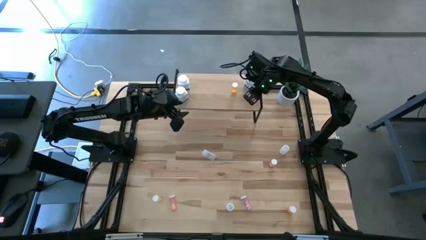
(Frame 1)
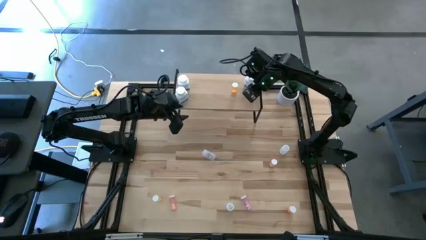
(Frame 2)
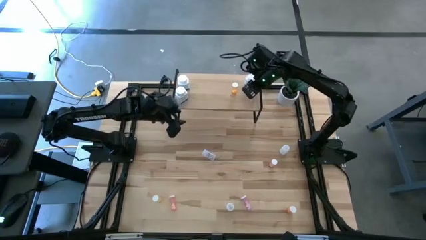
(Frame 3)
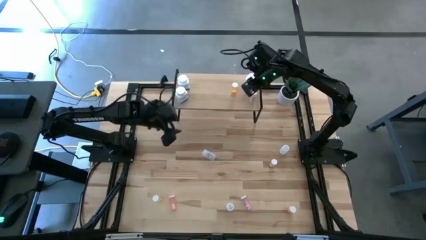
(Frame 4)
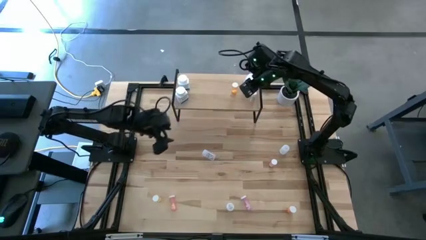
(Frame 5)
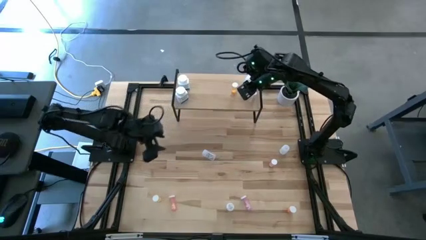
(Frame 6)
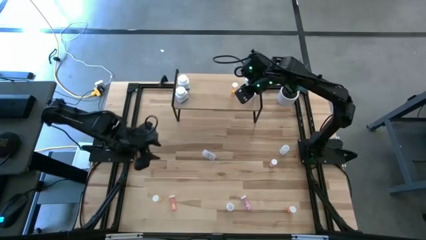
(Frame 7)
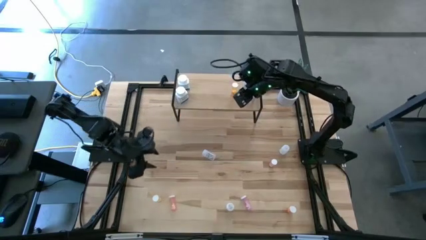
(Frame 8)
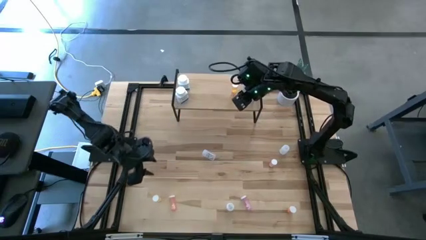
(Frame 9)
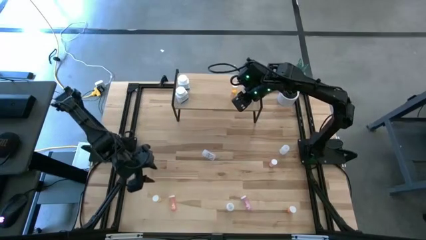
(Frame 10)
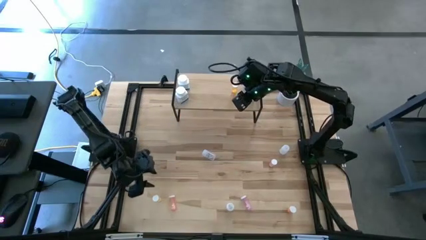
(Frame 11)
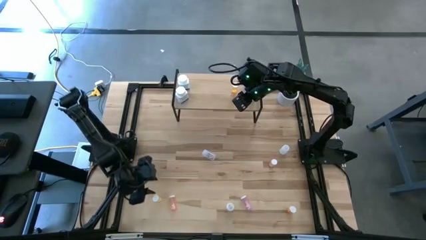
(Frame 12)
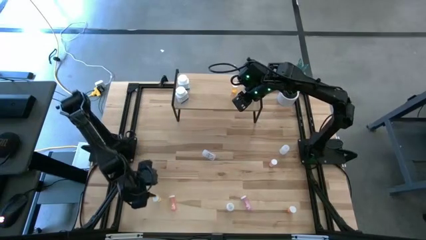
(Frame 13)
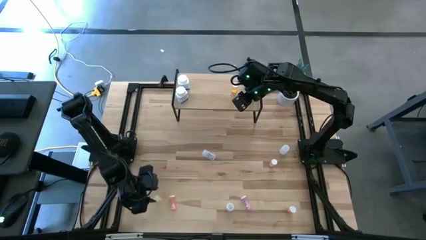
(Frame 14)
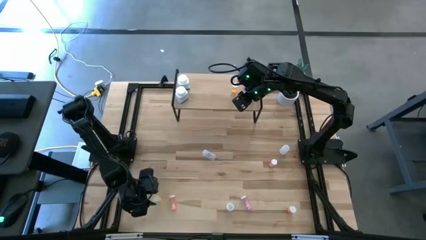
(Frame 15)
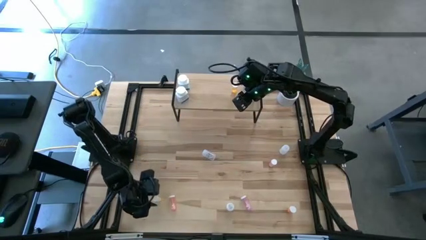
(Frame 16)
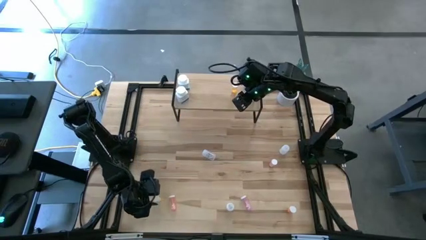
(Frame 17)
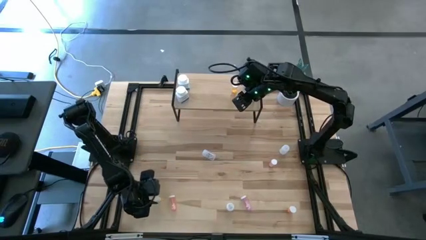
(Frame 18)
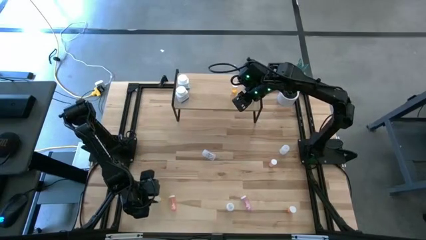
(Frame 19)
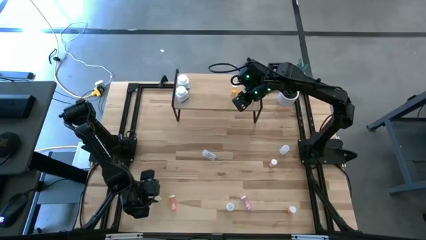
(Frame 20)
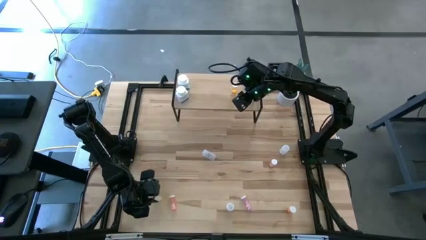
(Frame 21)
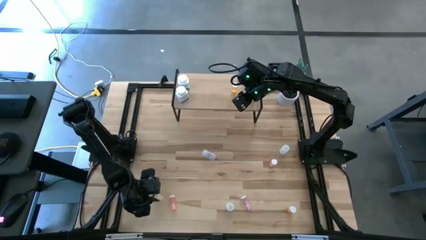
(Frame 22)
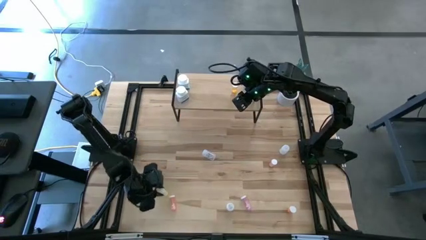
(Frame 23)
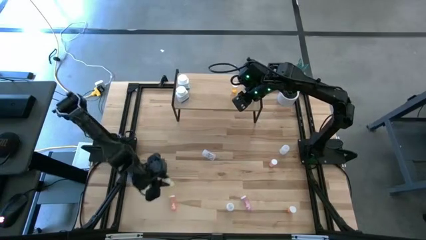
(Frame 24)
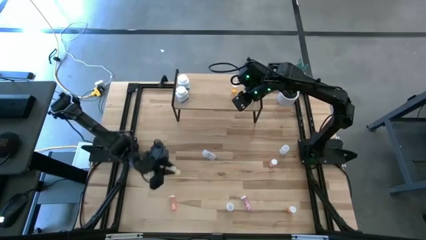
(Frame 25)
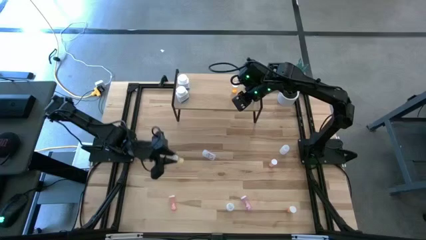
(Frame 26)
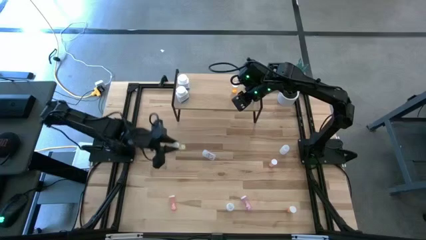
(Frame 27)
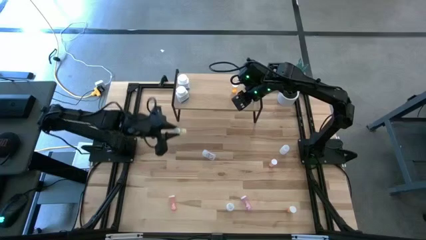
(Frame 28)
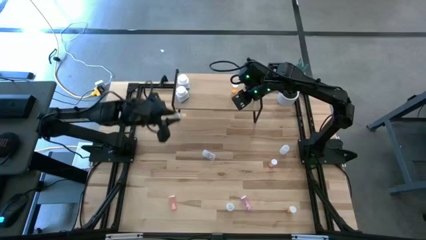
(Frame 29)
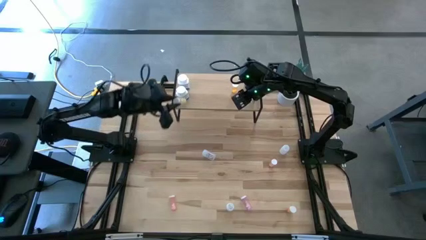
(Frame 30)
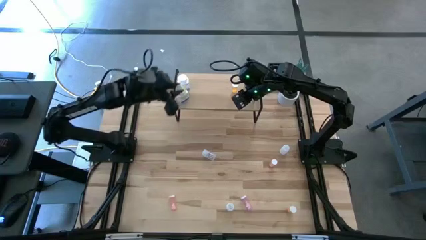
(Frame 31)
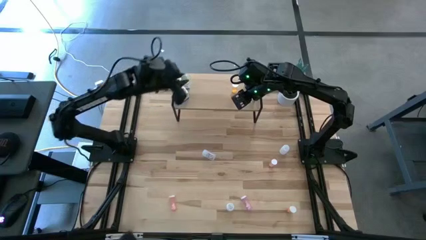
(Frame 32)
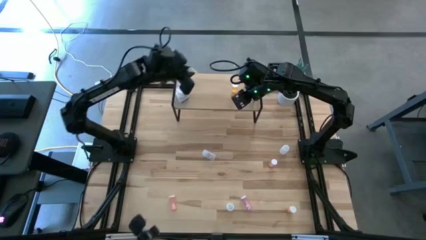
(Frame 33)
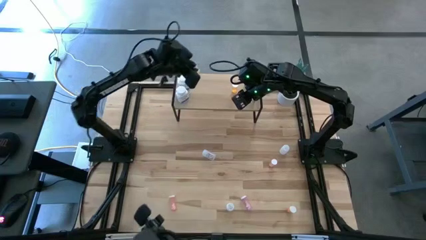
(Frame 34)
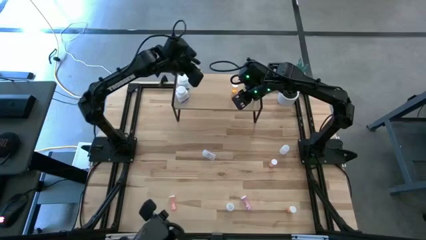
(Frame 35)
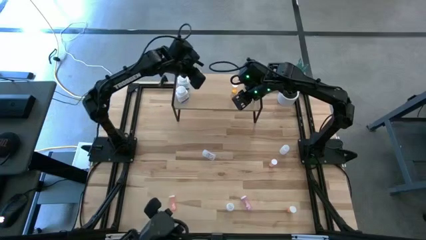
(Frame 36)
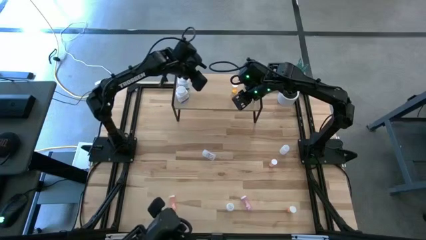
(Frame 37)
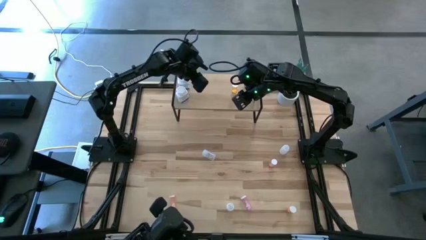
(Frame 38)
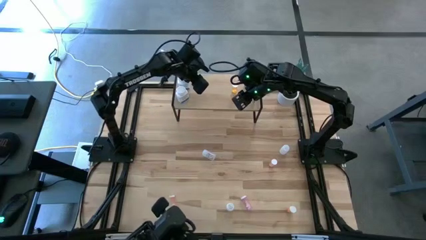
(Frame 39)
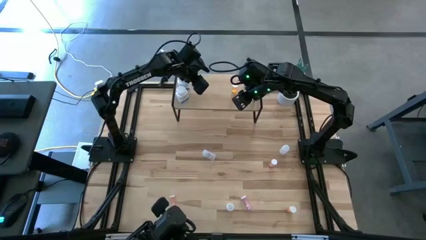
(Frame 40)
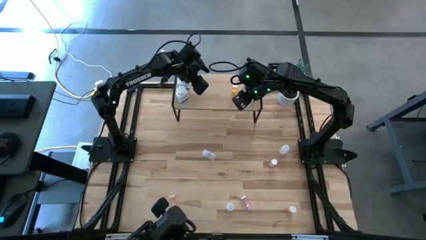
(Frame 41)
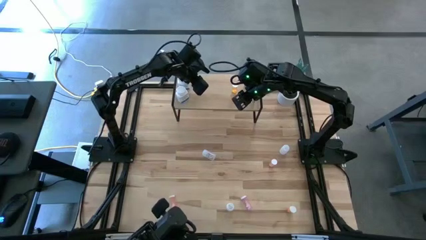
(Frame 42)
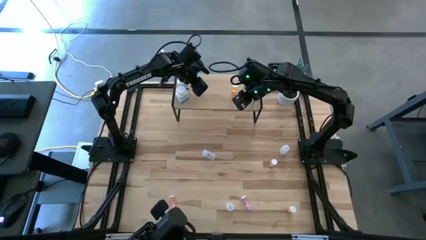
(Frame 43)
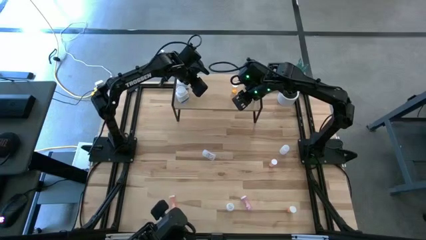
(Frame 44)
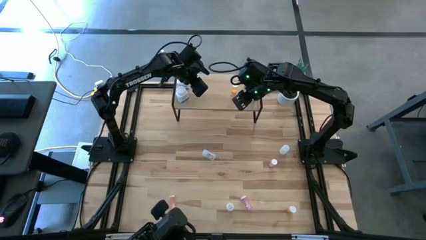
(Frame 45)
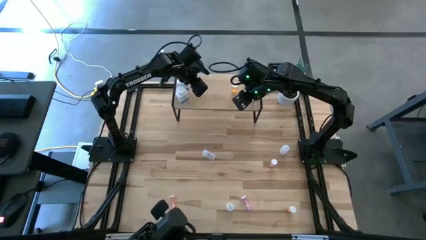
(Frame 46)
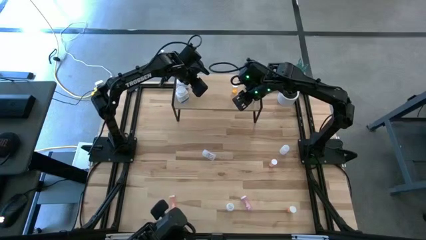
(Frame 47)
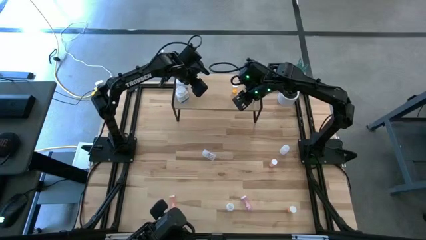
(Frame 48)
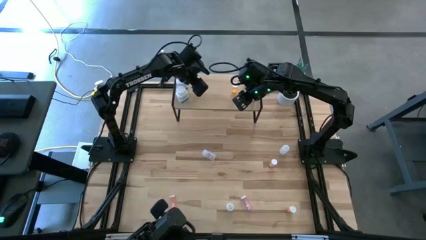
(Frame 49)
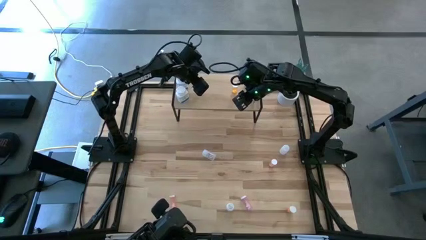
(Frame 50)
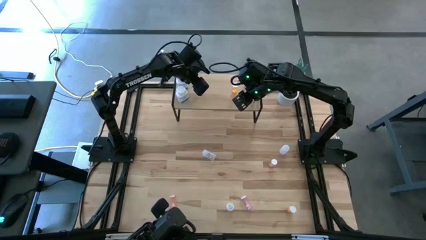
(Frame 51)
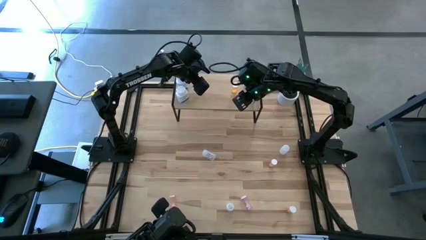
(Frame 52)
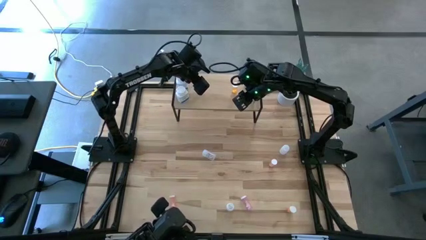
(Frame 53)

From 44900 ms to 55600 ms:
Task: Pick and place medicine bottles onto shelf by color
Put the yellow pill bottle on the shelf

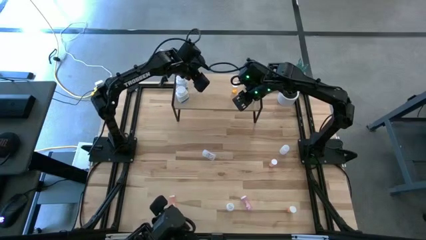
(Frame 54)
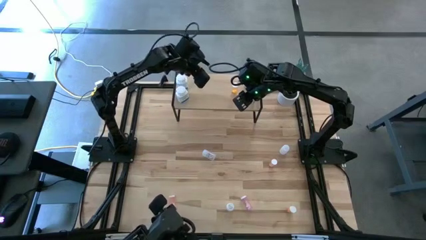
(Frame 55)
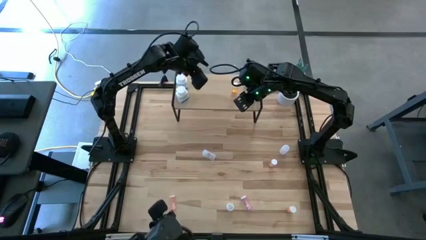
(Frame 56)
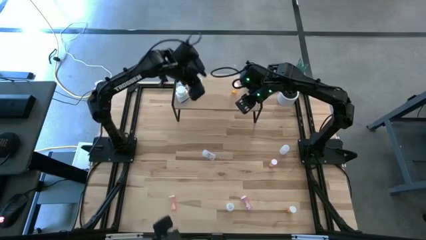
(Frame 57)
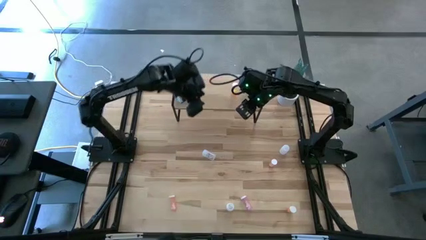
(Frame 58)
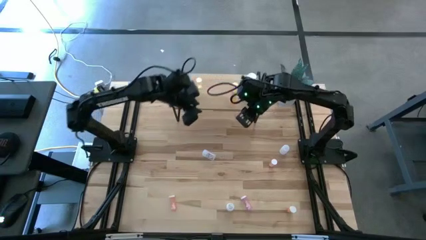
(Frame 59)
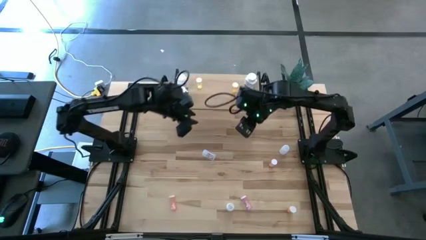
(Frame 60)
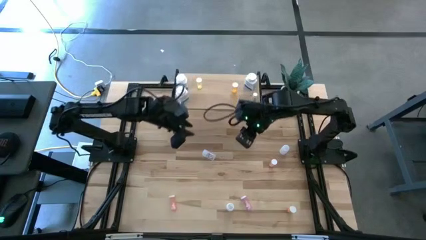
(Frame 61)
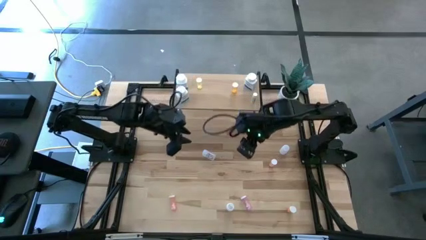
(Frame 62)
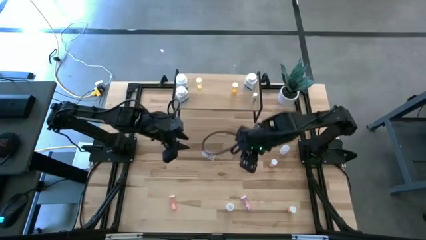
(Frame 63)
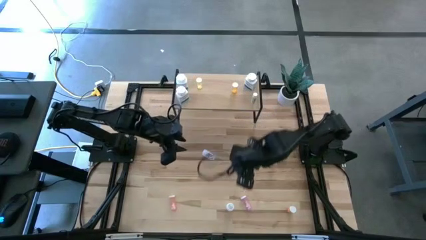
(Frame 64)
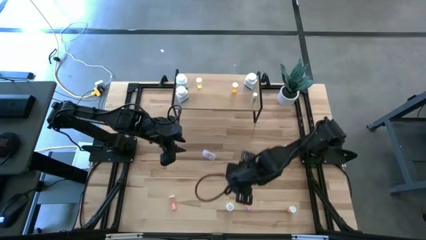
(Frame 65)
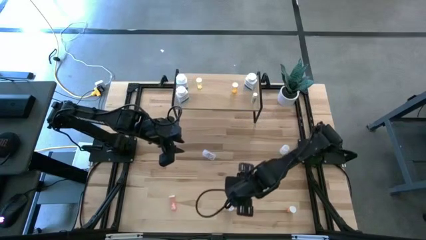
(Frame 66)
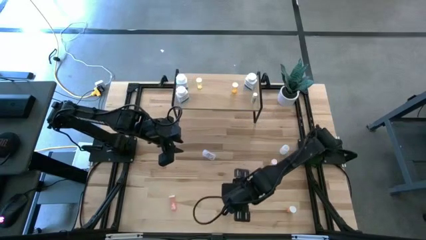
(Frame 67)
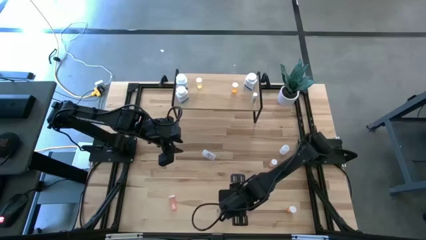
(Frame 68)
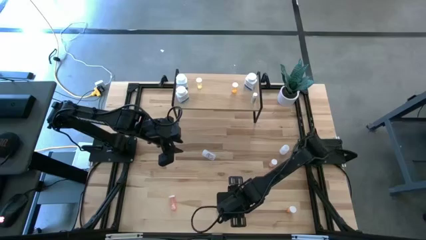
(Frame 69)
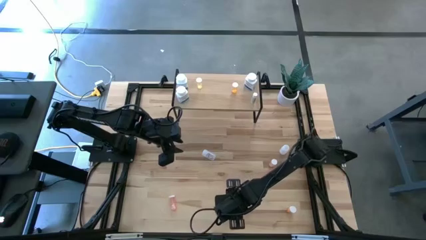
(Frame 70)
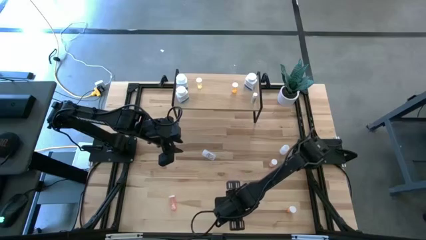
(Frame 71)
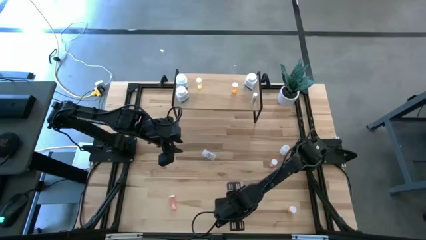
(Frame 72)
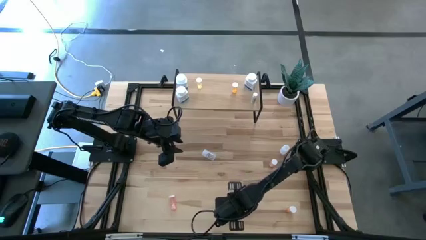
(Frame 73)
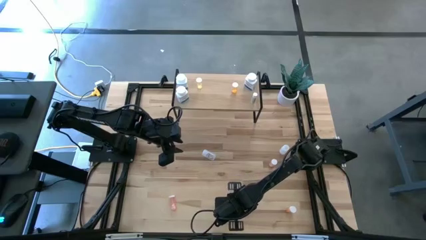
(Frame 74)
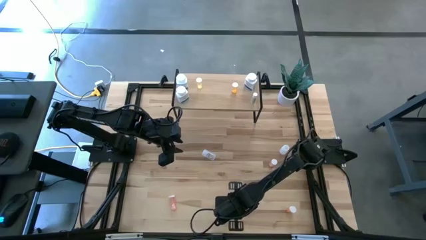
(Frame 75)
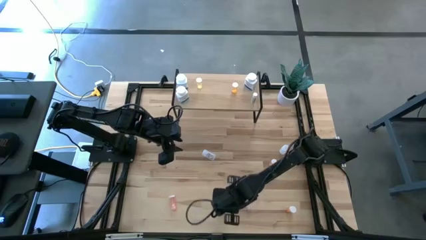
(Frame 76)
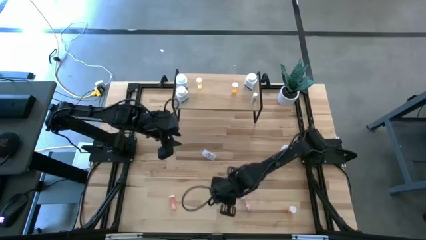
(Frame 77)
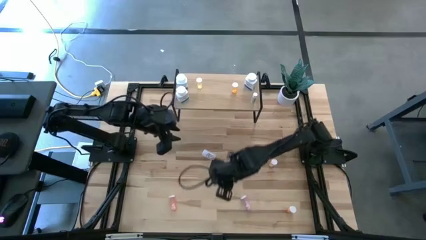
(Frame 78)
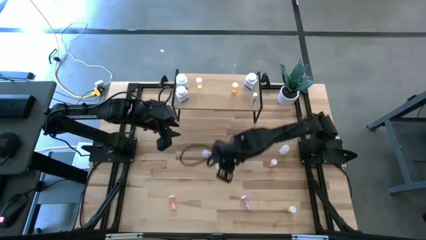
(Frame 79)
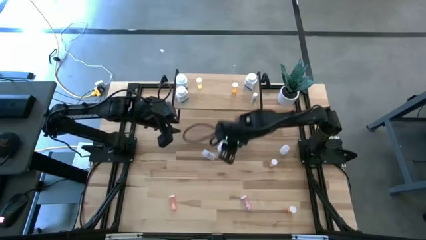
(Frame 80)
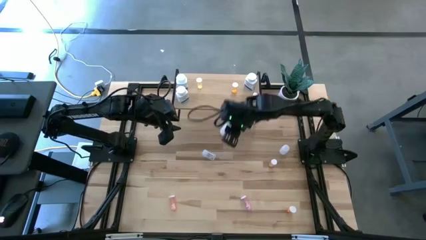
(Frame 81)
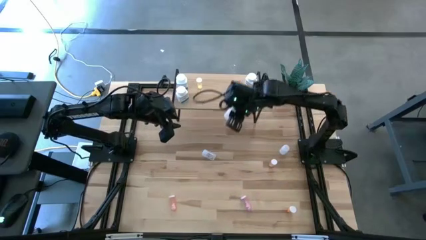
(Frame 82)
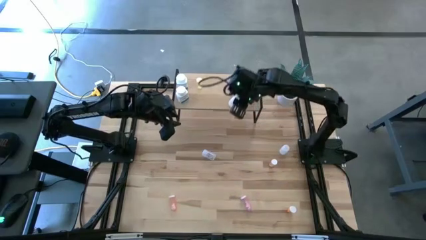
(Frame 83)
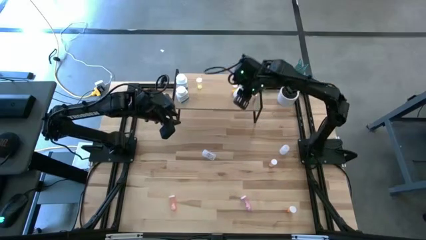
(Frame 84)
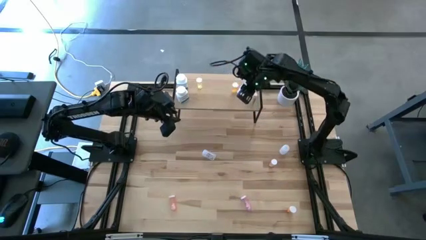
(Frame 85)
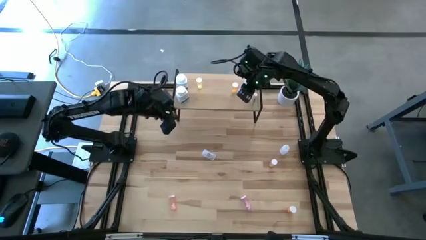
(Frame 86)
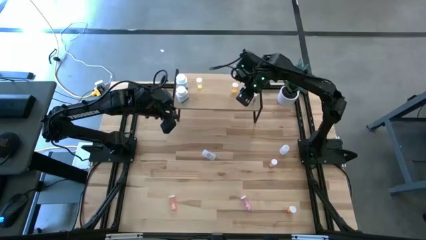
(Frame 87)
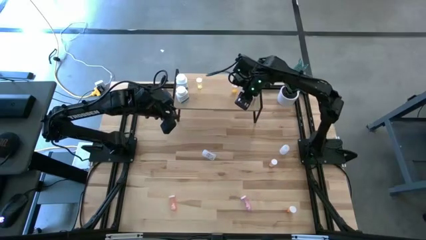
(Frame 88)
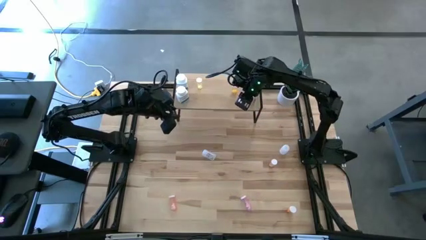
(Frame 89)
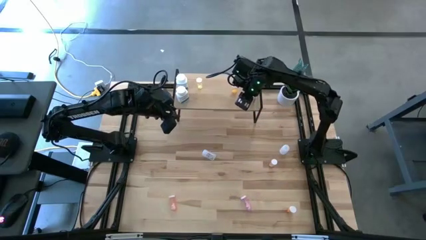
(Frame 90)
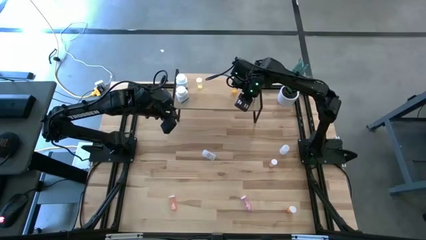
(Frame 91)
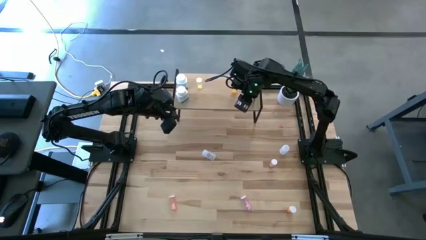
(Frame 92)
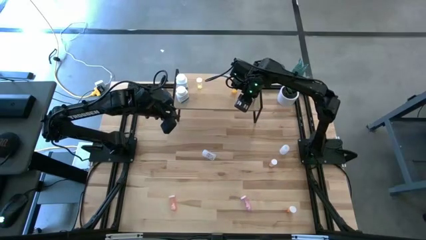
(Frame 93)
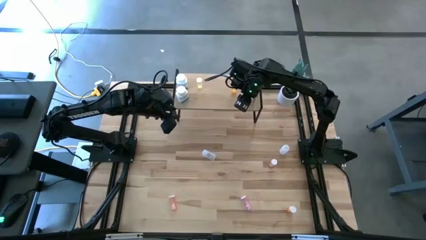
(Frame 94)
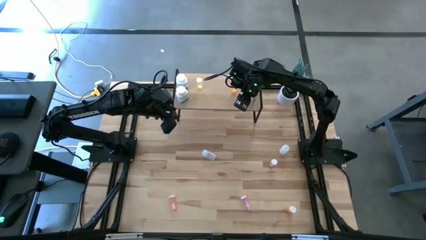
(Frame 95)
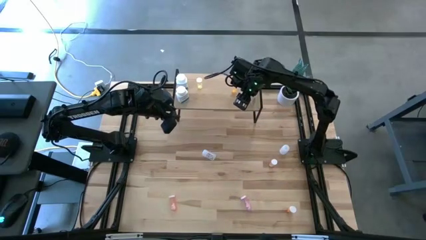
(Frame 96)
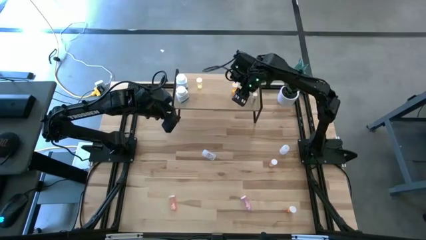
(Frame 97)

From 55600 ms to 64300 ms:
Put the bottom white pill bottle on the shelf
